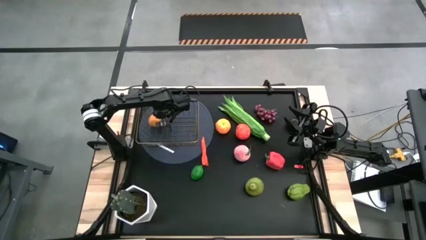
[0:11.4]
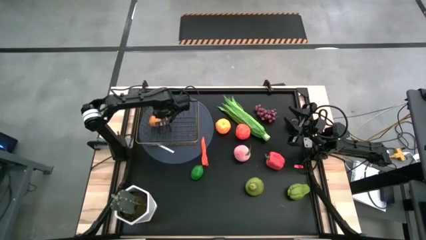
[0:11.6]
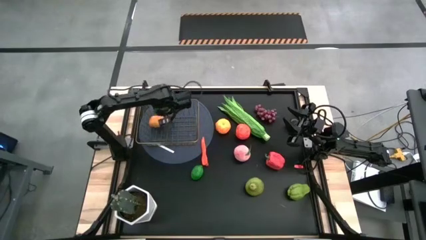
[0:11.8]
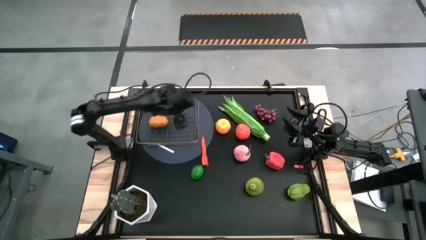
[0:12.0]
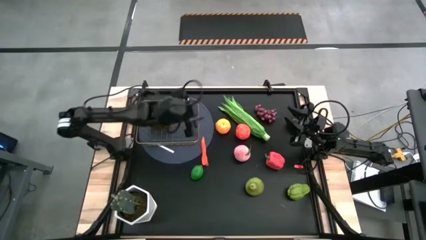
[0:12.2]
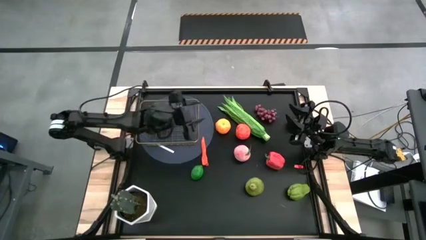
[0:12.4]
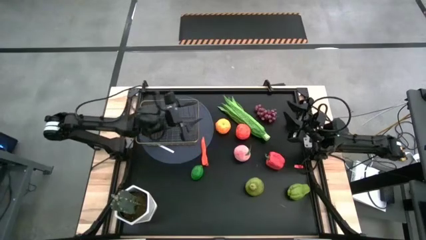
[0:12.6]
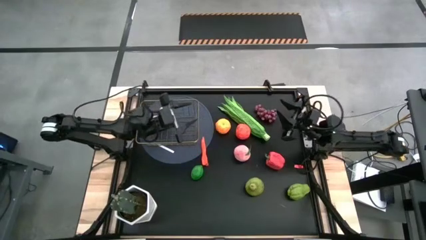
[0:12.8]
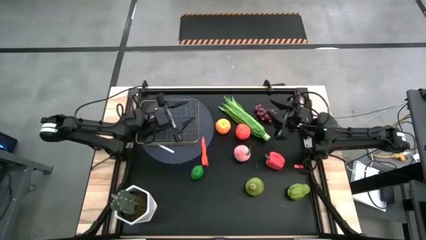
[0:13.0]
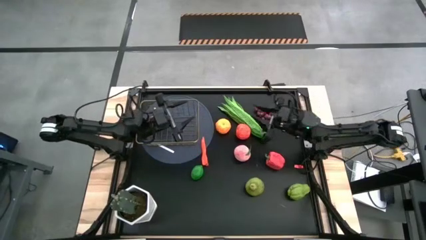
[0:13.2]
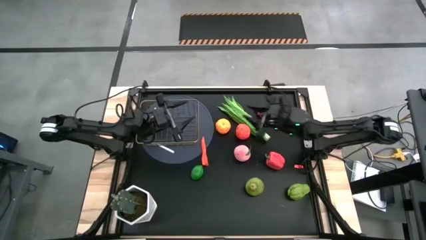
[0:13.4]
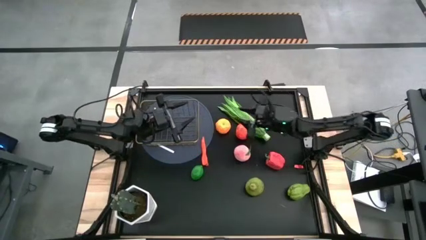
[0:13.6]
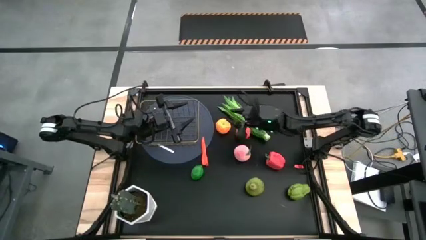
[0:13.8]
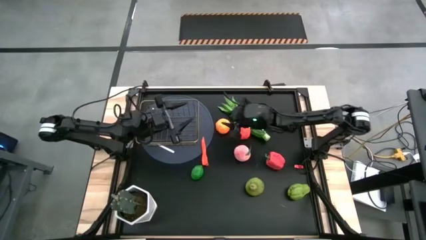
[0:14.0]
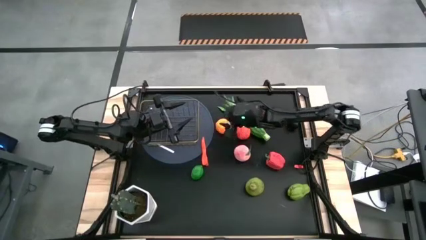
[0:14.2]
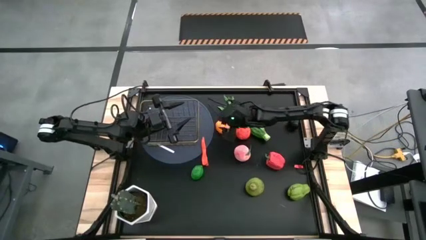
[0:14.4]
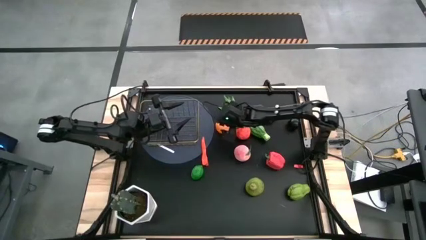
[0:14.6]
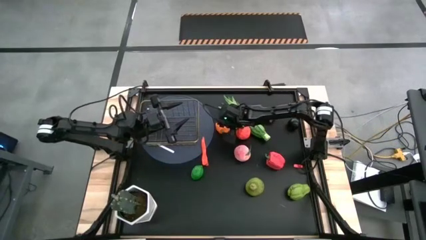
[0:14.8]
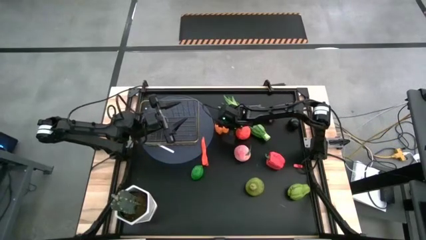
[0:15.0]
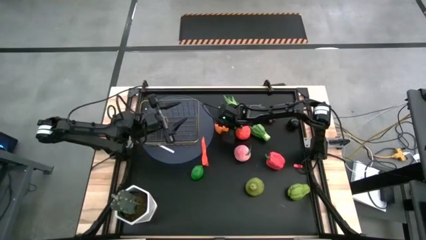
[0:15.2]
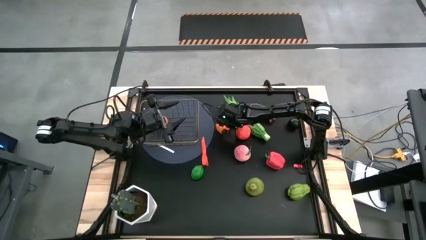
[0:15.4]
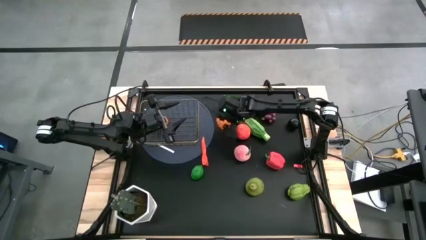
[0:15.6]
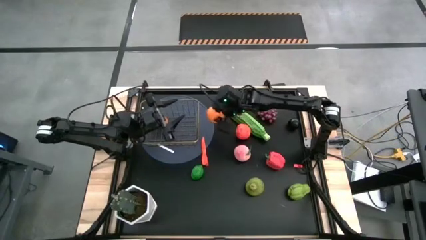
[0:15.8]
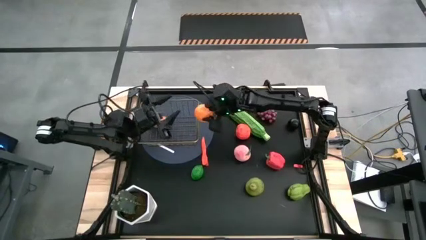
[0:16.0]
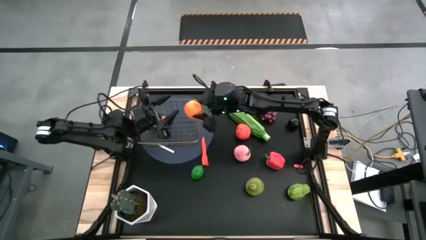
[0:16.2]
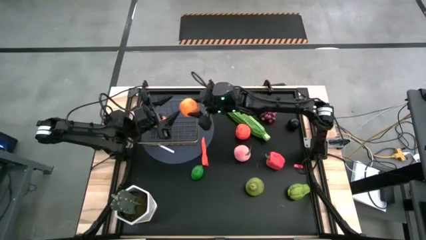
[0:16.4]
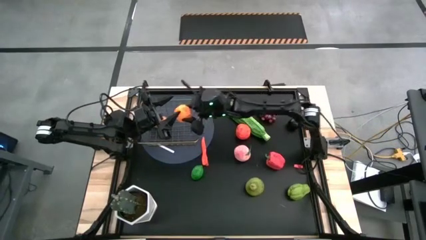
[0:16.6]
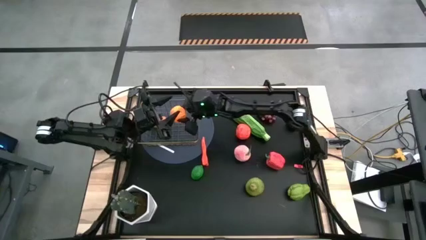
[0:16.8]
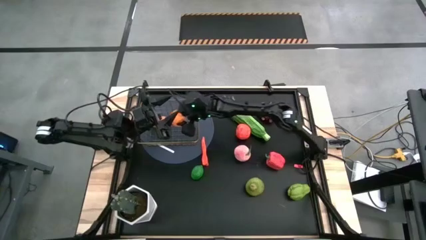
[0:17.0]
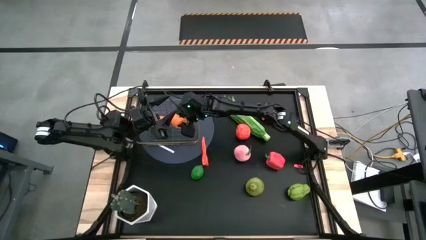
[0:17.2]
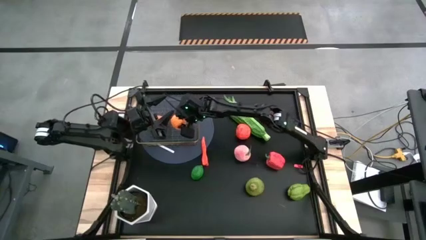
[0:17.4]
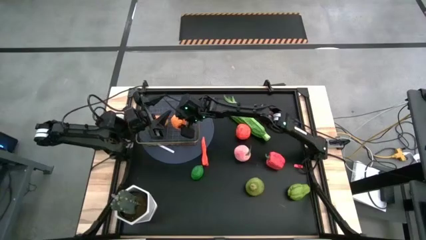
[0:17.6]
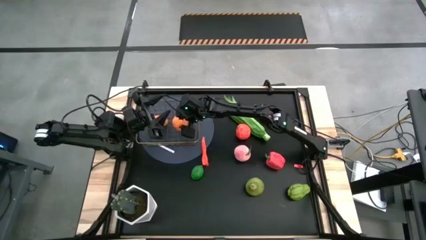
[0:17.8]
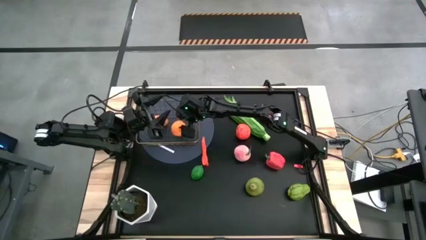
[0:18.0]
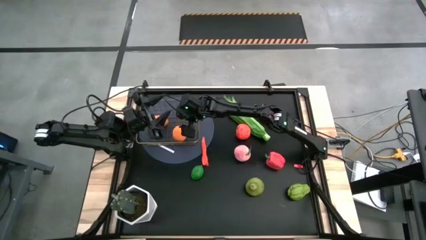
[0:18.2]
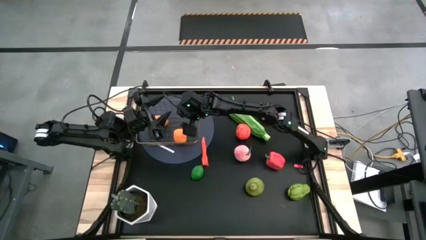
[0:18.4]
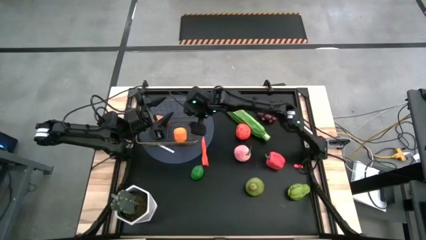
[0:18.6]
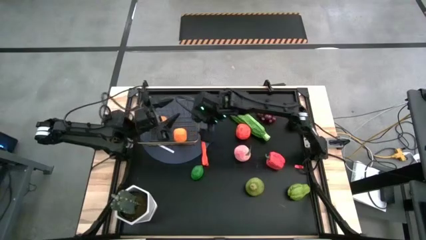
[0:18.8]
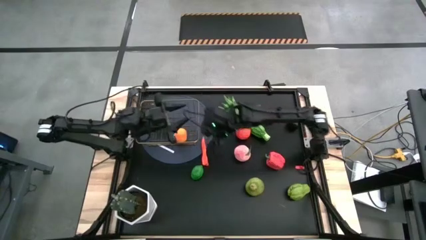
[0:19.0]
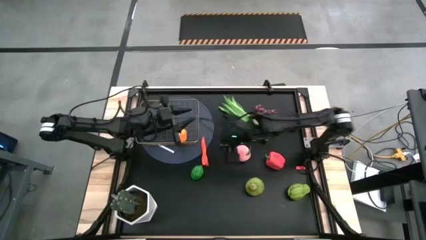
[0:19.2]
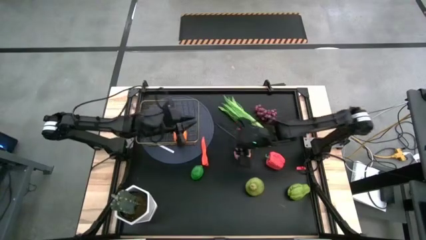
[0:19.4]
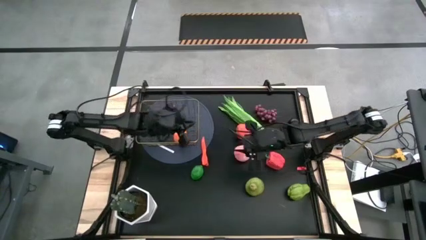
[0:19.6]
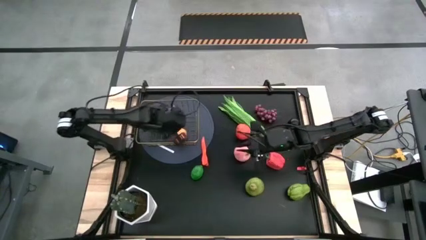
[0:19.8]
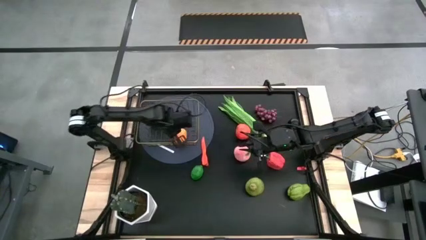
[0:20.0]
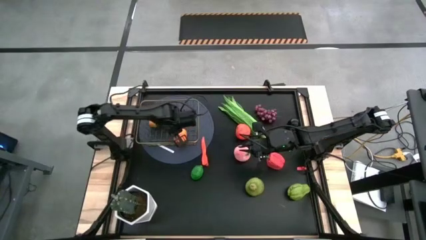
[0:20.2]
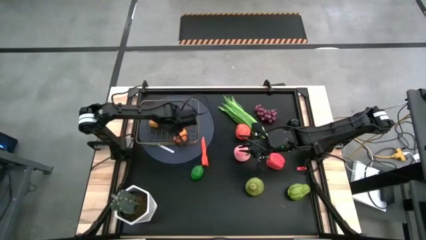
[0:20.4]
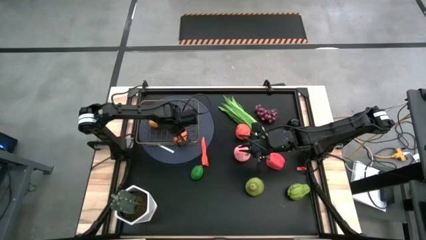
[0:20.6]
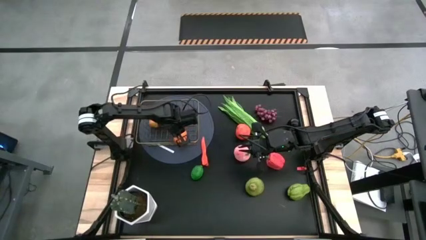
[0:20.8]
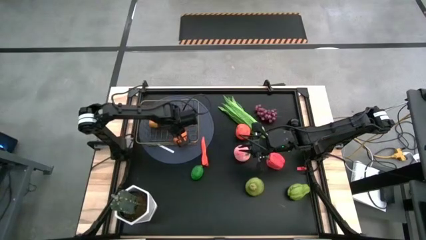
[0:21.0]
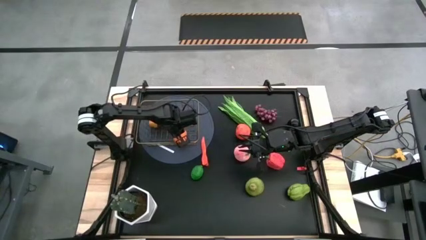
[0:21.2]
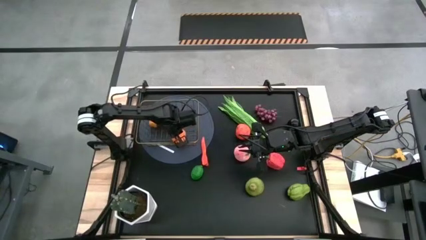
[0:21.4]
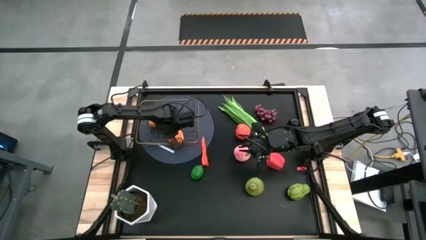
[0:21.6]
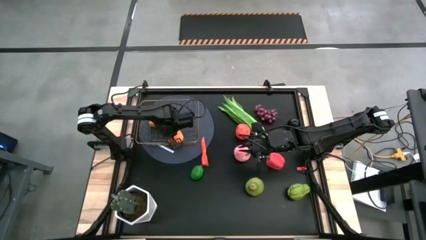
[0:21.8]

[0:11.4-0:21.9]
Task: Build produce basket
Put the orange into the wire basket
